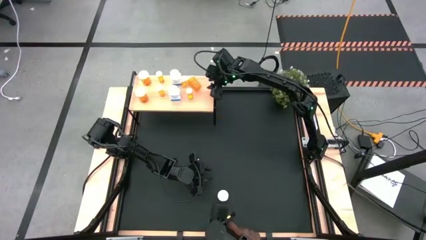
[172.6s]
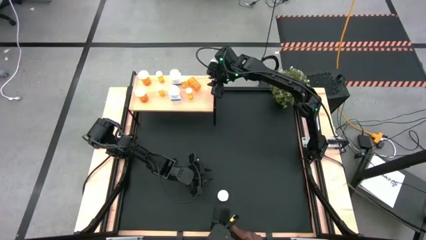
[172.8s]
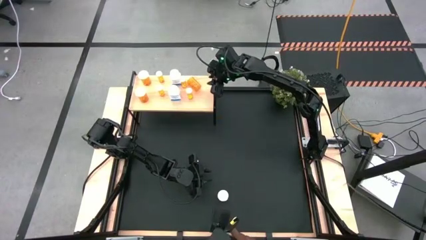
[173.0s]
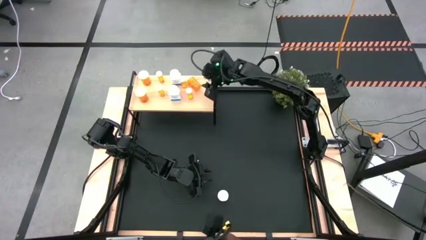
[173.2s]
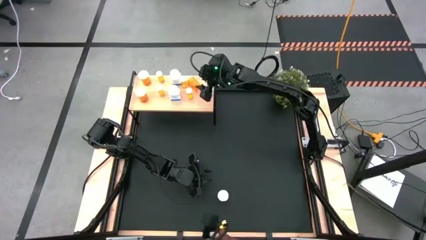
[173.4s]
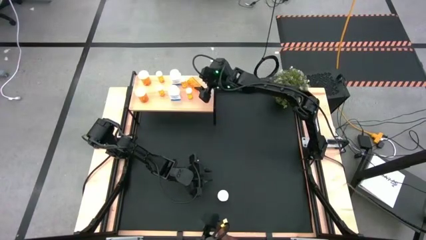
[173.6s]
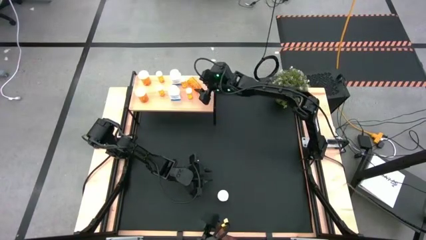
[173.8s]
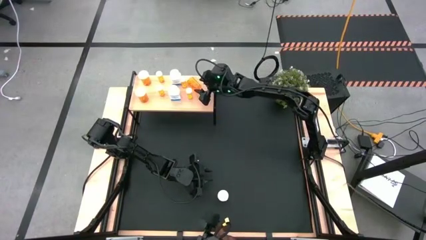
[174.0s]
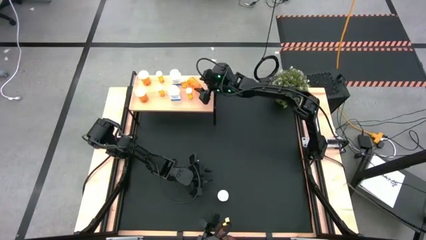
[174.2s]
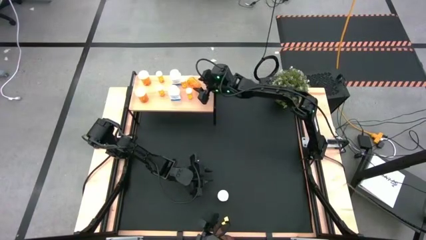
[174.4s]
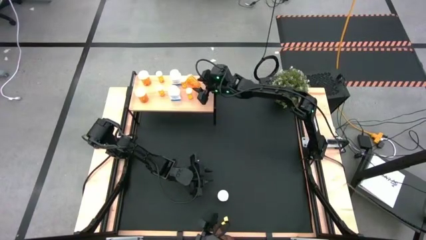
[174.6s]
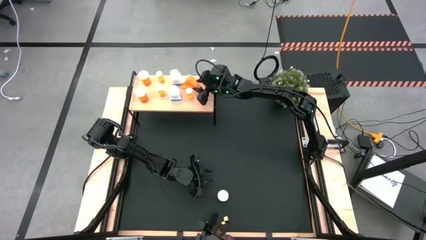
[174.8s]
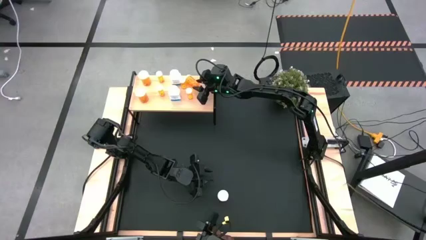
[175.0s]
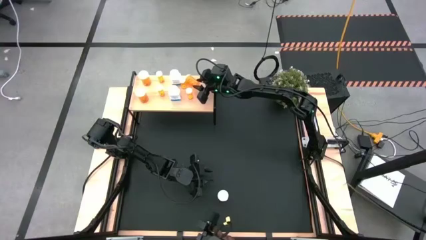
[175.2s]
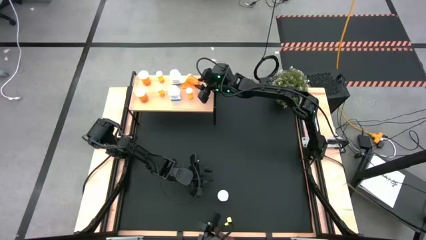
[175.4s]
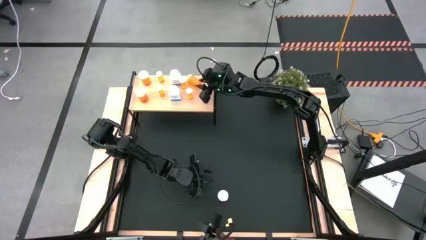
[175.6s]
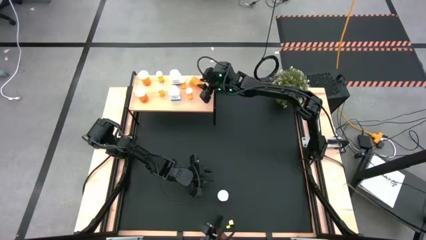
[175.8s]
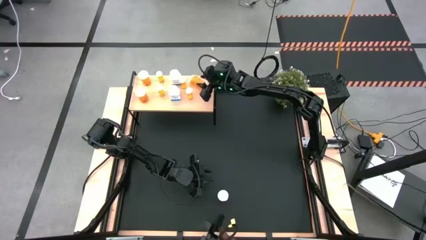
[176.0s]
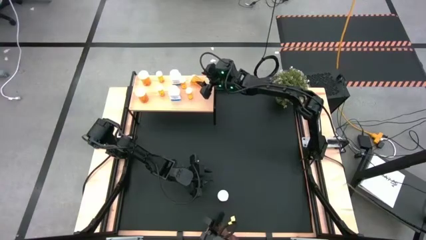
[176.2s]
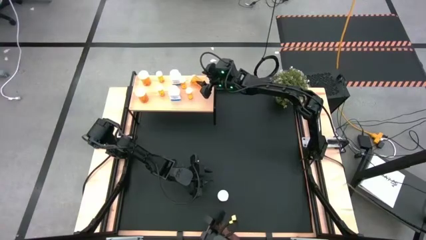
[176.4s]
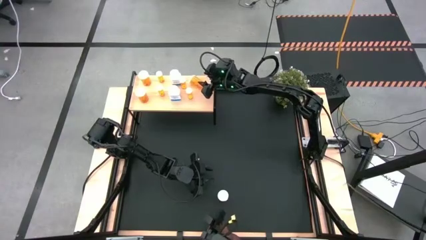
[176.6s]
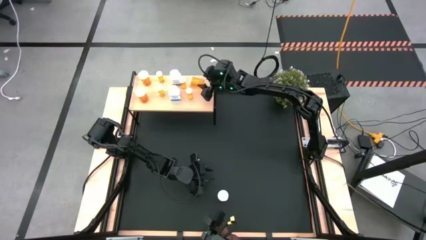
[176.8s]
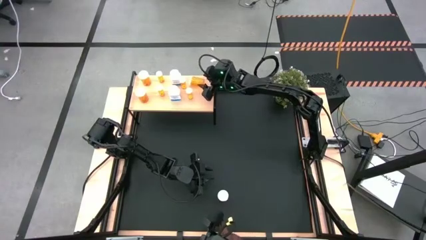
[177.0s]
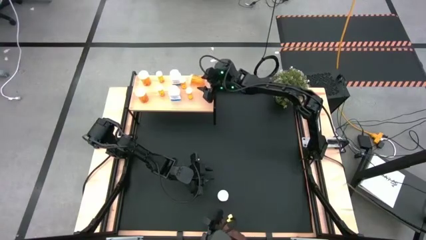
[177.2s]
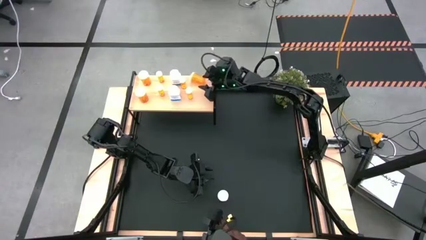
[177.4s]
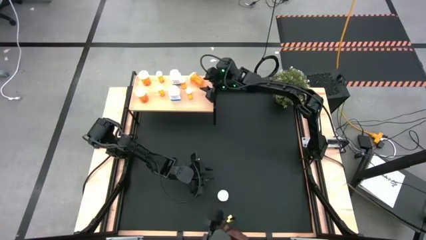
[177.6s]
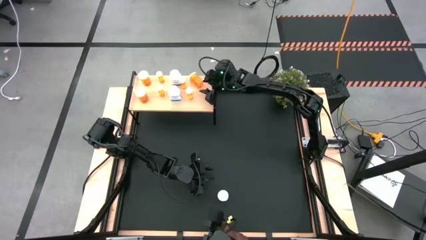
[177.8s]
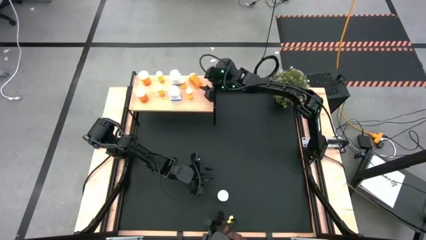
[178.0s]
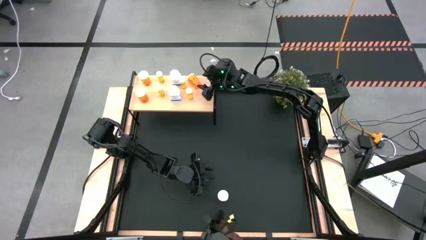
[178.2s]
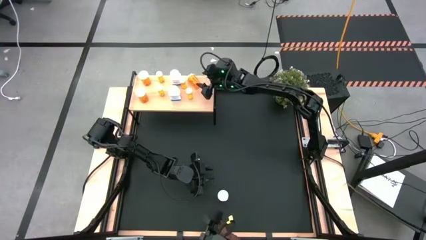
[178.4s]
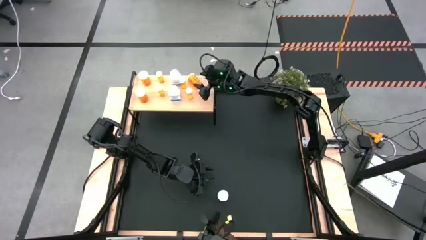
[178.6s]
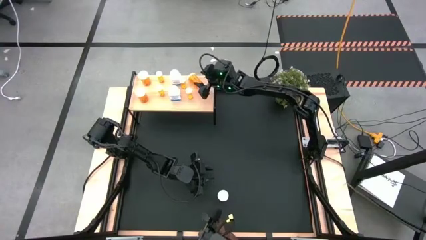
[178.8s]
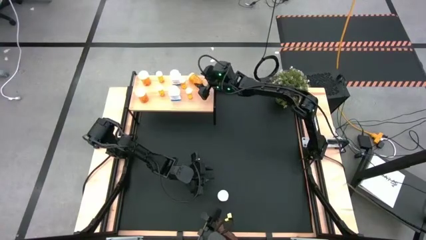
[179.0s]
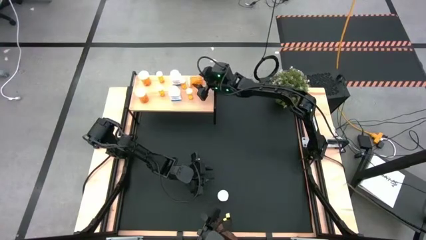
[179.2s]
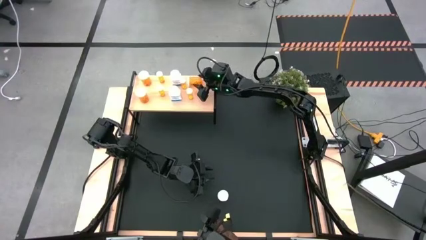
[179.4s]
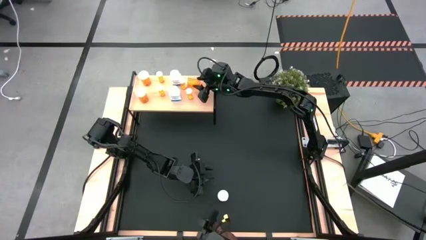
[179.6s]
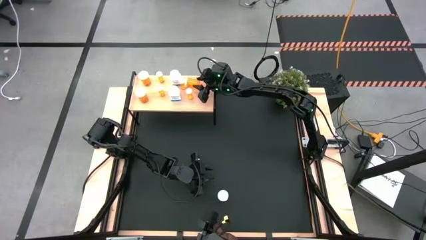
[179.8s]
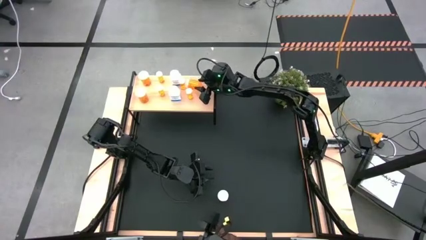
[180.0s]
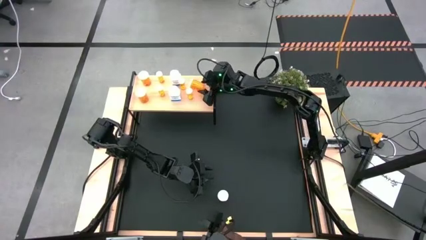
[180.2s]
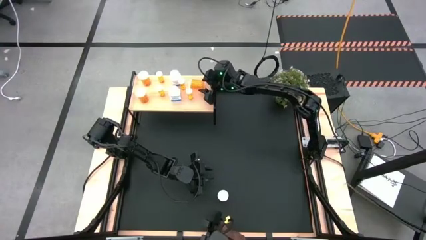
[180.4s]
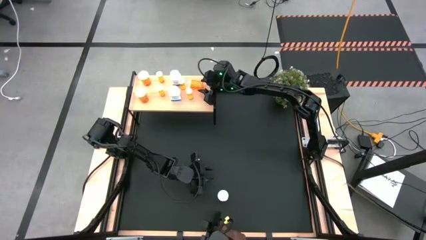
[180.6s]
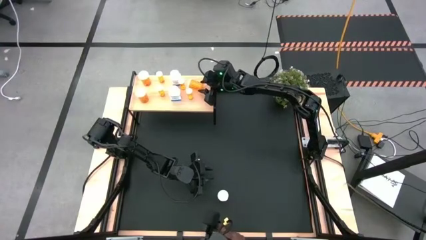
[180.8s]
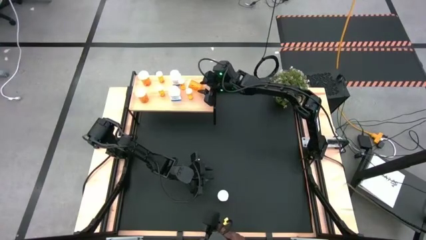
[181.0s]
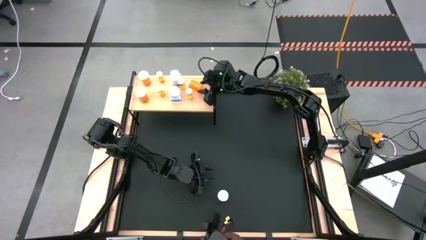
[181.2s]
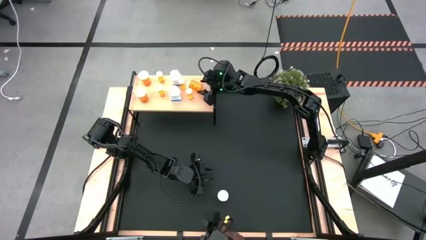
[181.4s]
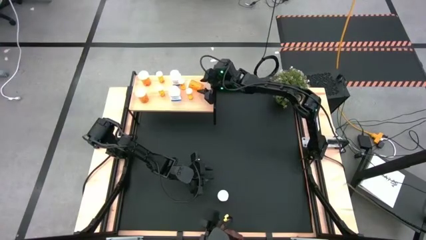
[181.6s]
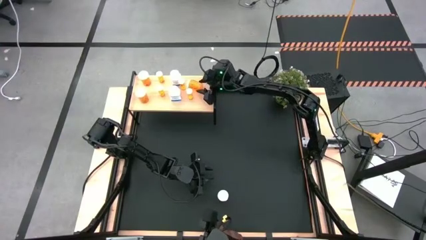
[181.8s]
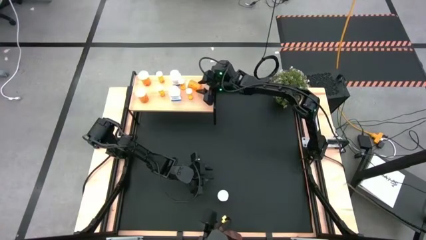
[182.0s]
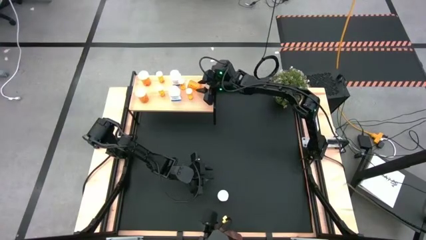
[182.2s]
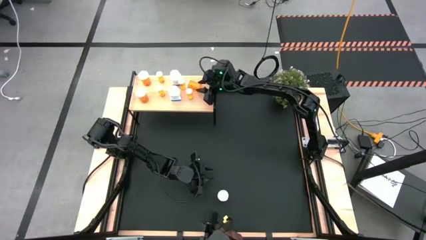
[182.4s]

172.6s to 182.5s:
Task: Pick and place medicine bottles onto shelf by color
Put the large orange pill bottle on the shelf
